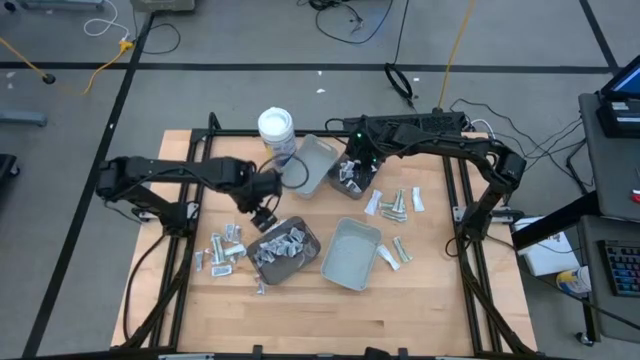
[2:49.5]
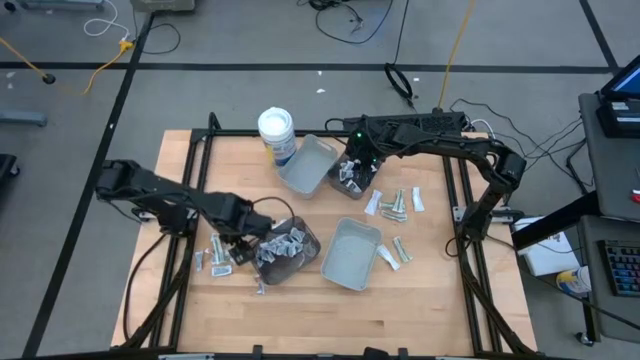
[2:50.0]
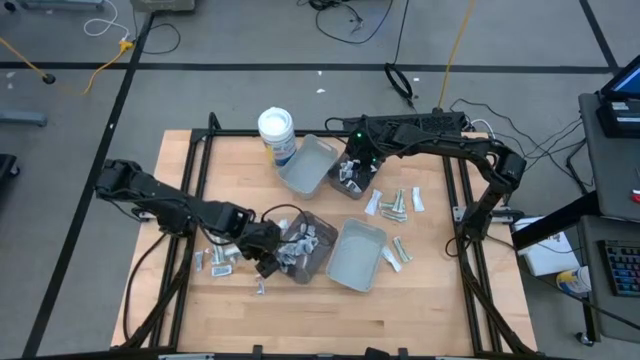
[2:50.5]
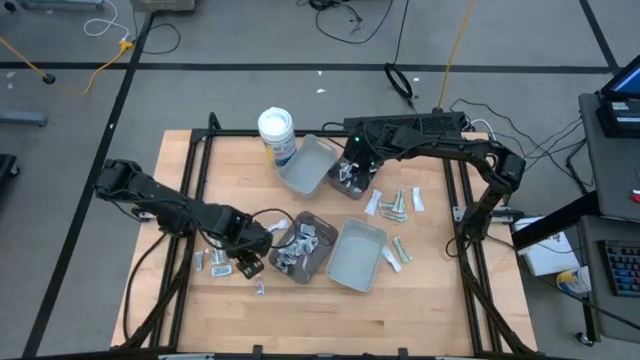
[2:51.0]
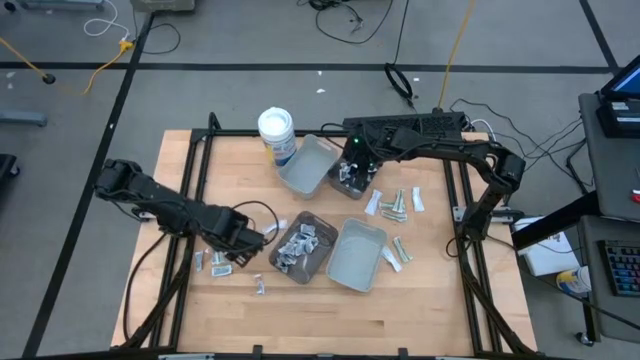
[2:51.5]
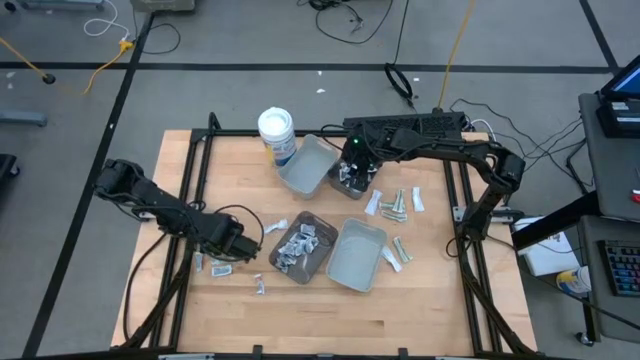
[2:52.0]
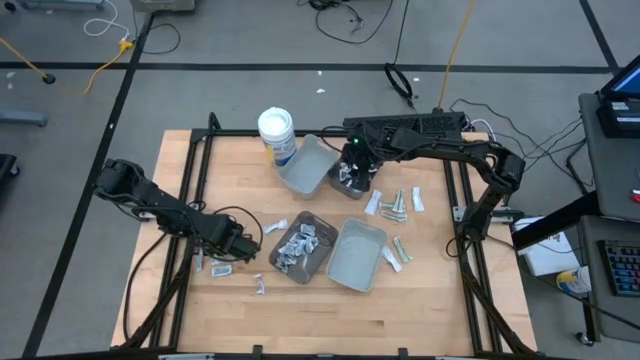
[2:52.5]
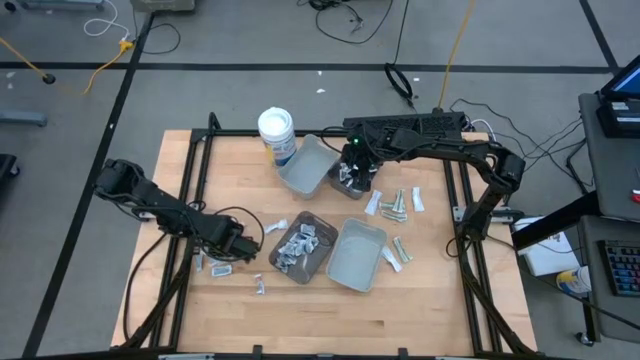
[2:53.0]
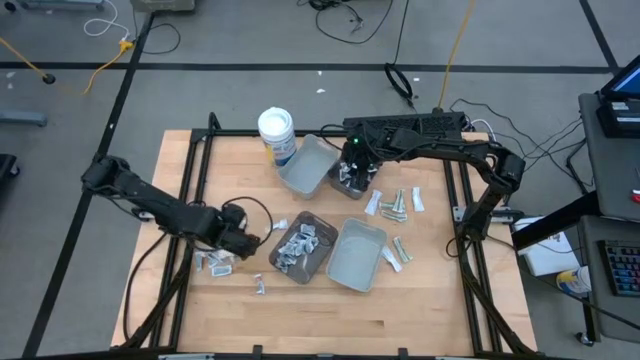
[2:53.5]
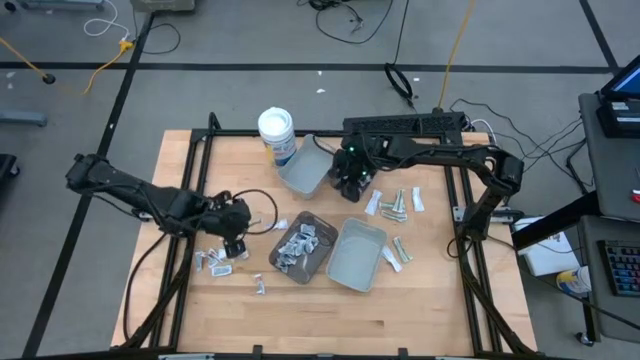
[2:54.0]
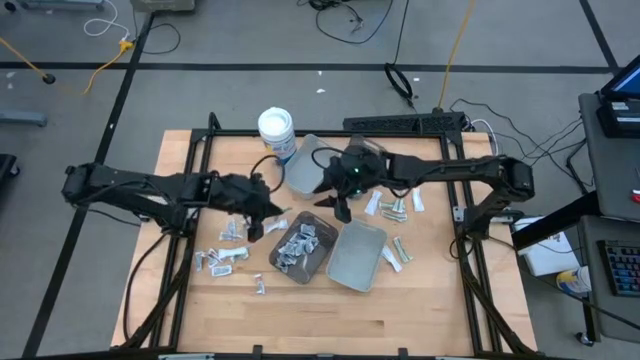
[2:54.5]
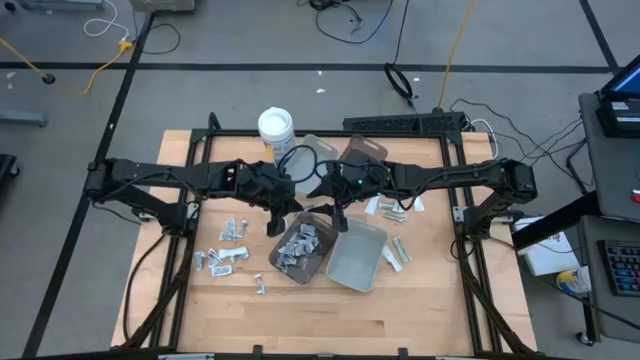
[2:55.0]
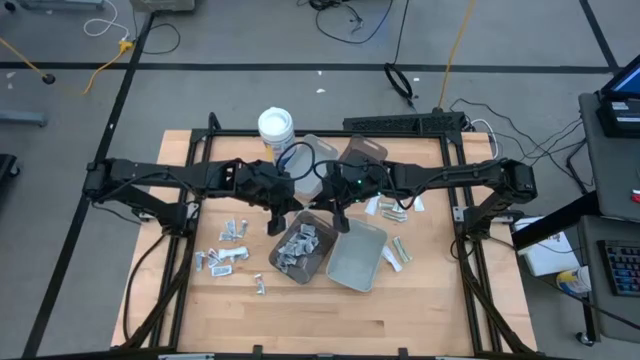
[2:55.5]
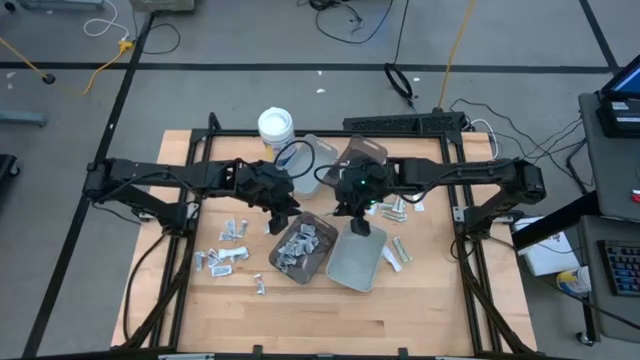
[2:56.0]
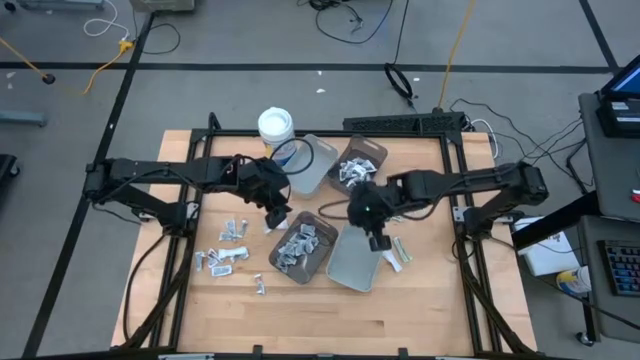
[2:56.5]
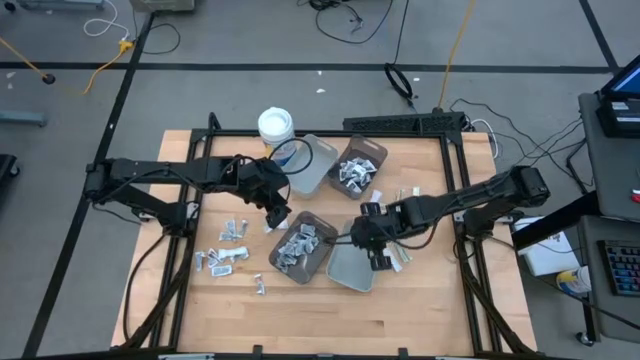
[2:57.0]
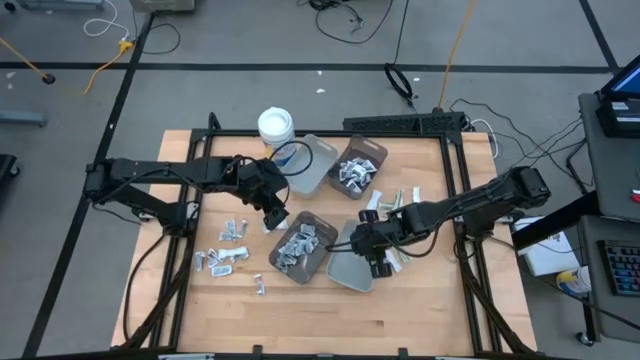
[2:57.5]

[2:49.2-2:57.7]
Task: Pick & Place First Aid Supplies
Put the green bandage into the bottom gray bin

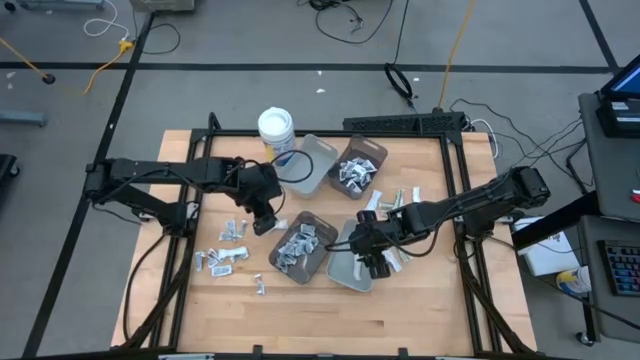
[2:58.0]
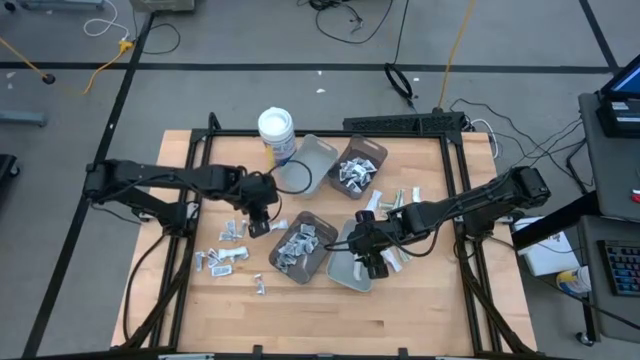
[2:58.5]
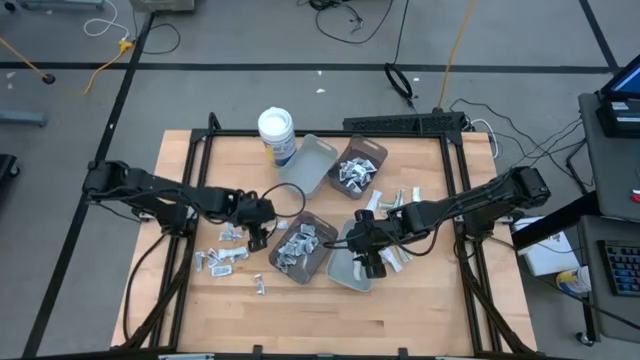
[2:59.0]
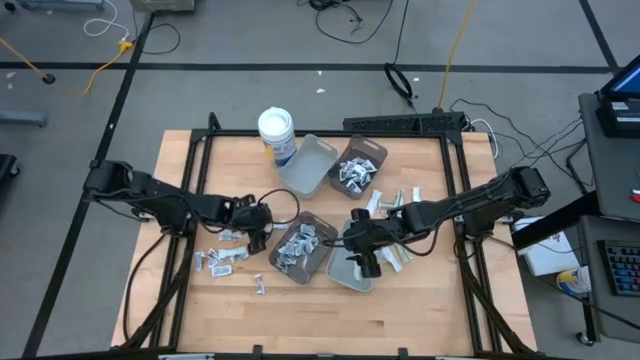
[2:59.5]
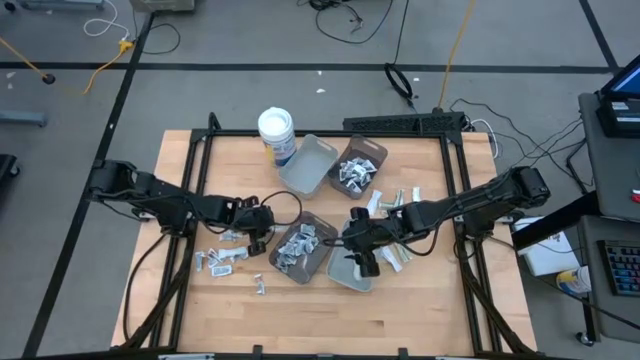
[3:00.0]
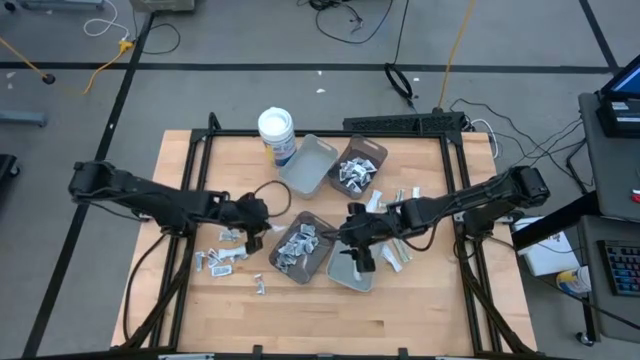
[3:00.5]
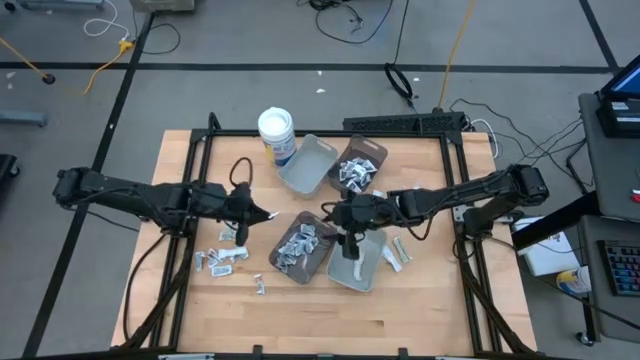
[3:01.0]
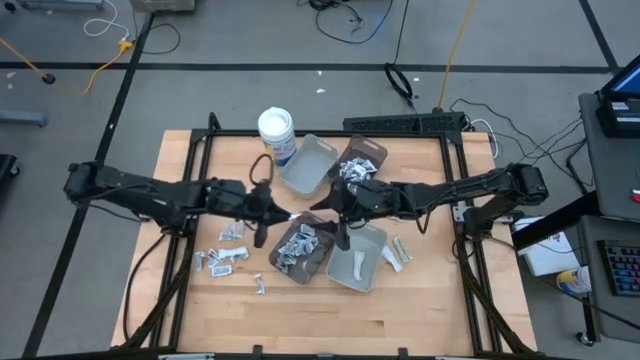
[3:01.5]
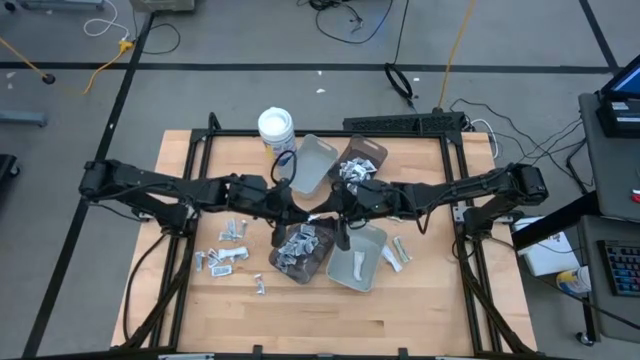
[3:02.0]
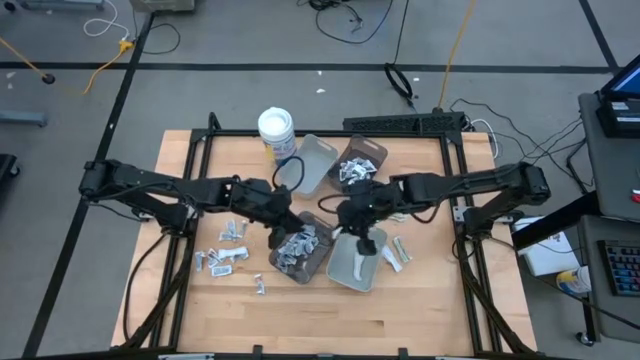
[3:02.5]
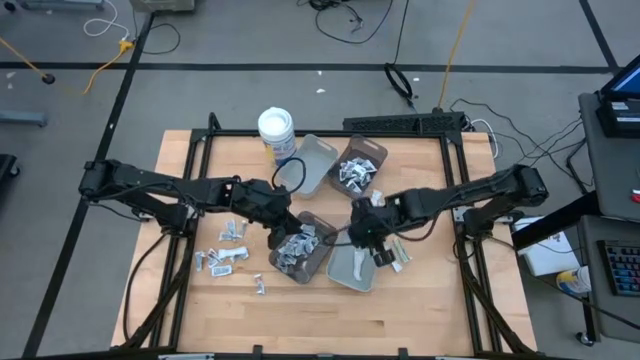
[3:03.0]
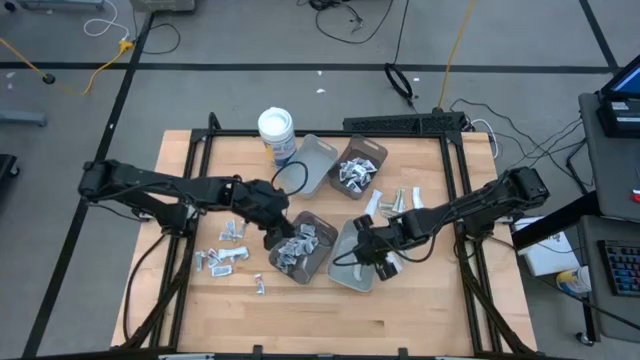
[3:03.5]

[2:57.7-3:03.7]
Put the green bandage into the bottom gray bin

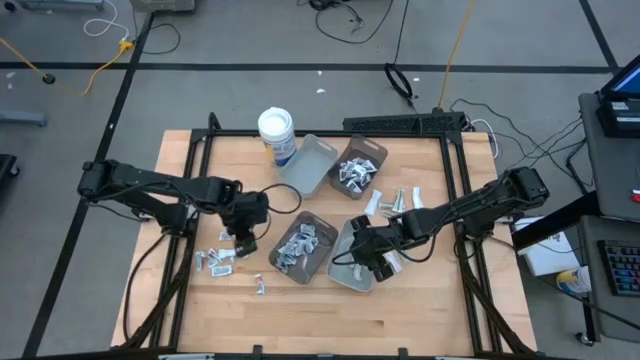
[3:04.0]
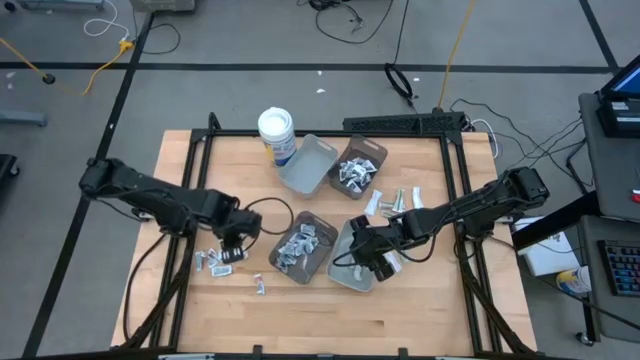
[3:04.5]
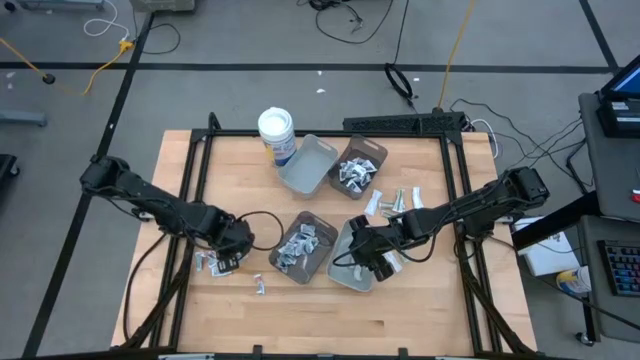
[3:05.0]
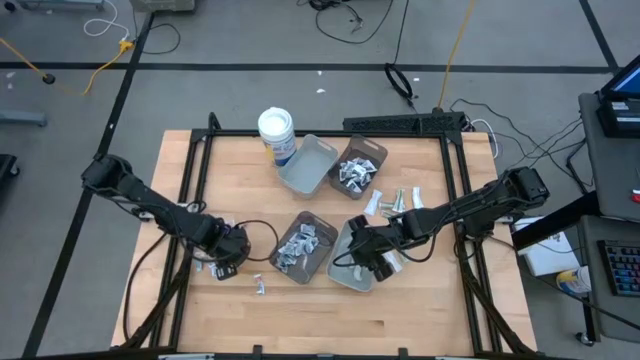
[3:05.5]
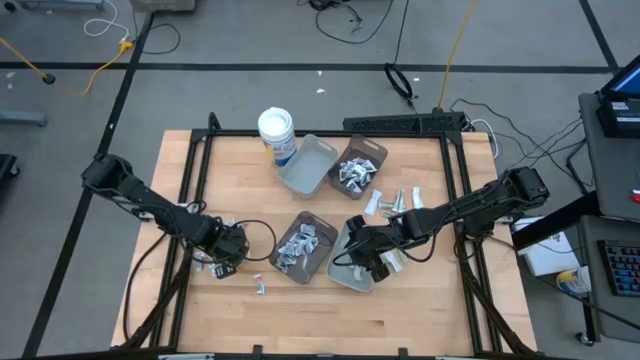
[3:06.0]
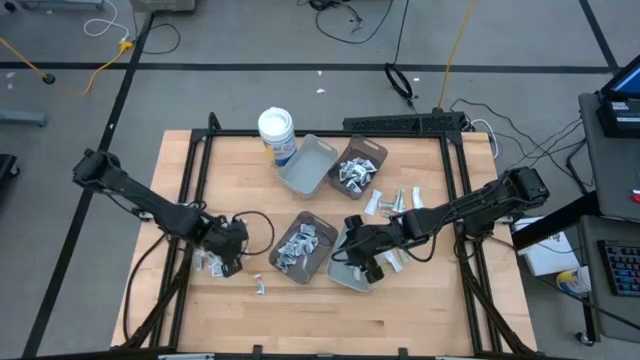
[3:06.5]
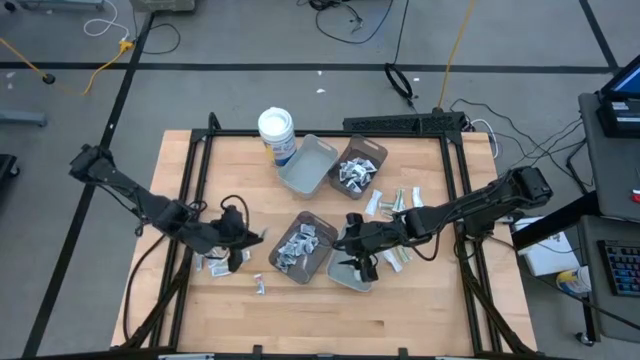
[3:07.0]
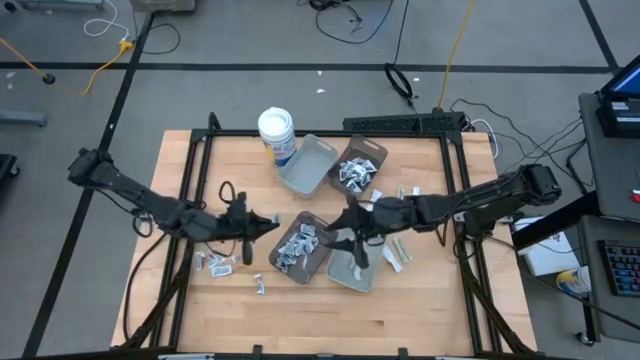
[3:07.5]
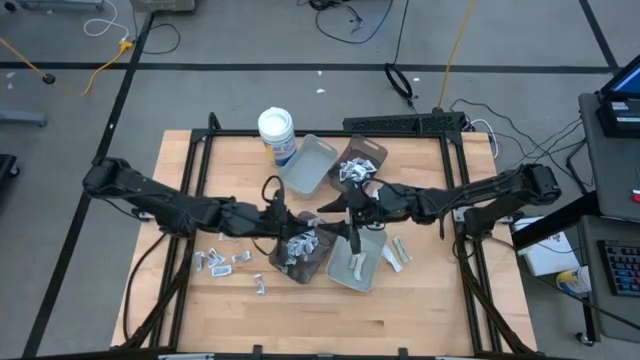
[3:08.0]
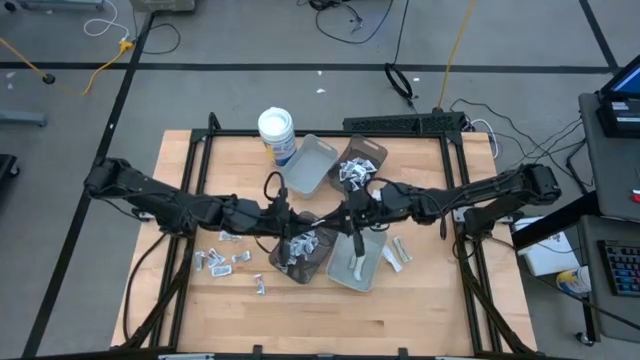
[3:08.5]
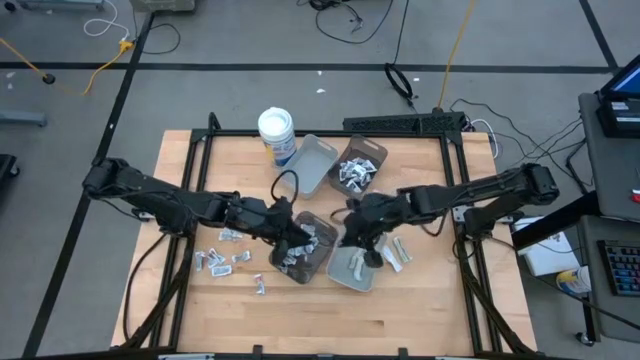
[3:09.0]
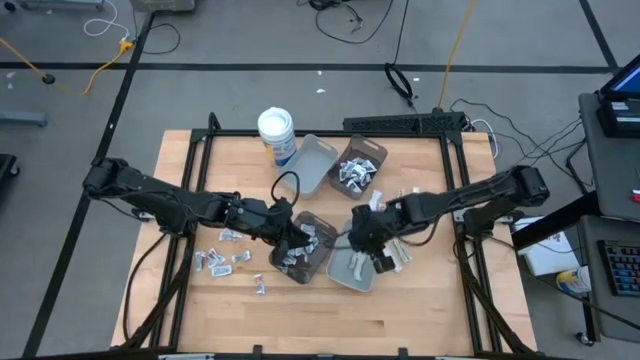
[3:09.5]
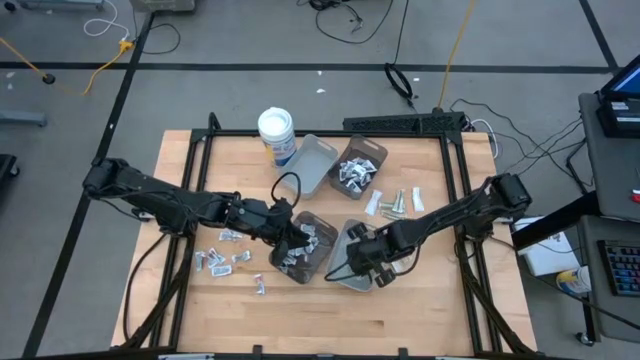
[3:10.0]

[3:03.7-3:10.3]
Put the green bandage into the bottom gray bin

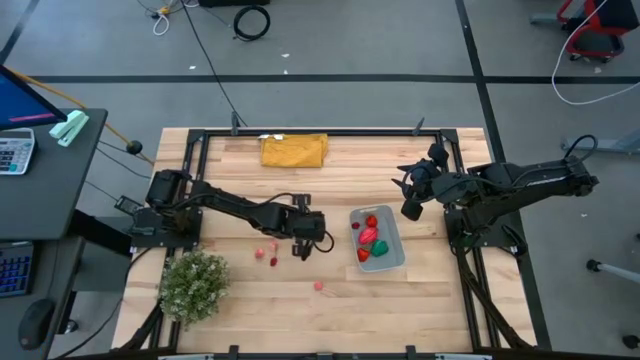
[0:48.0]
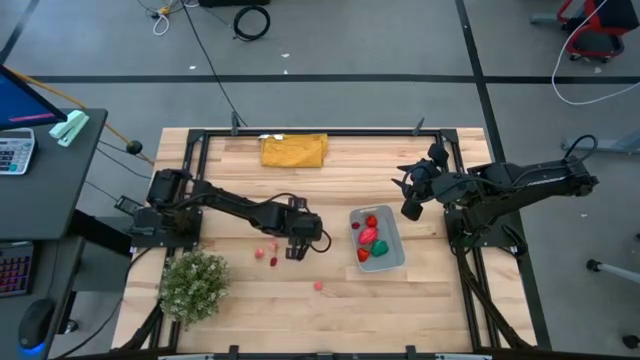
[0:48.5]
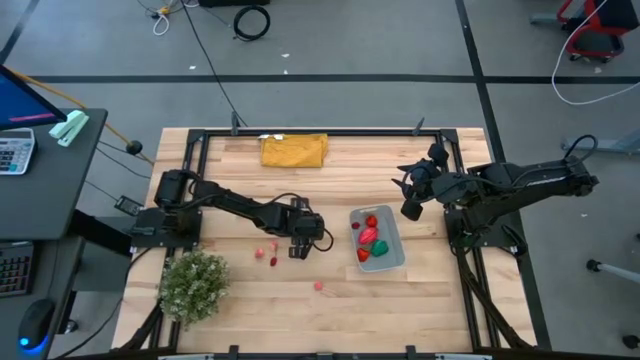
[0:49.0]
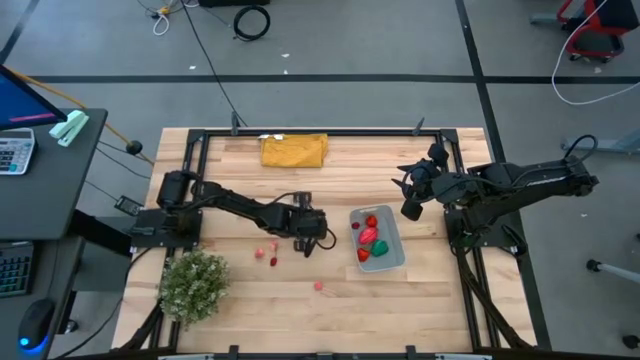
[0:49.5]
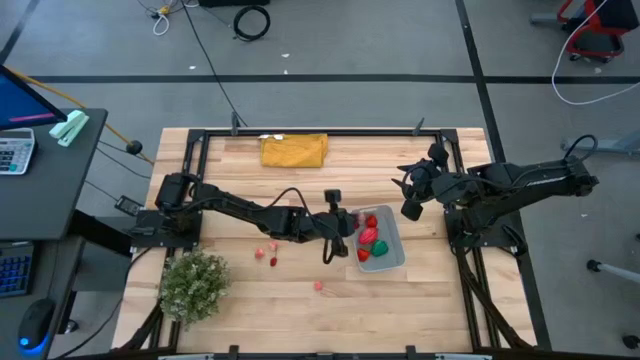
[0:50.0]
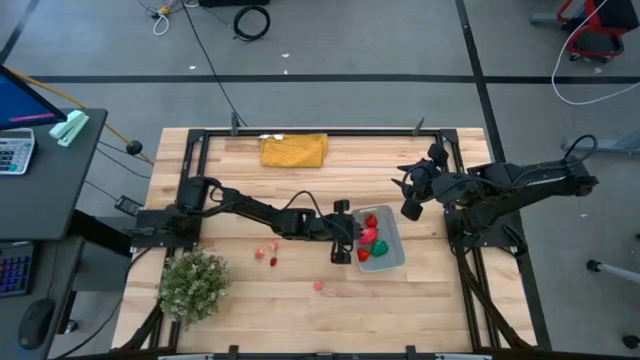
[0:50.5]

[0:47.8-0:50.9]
Task: Pick and placing Produce into tupperware
Put the pink peach into the gray bin
